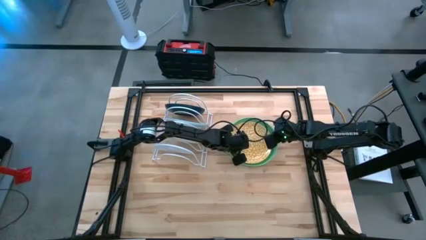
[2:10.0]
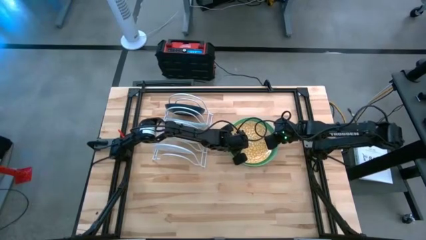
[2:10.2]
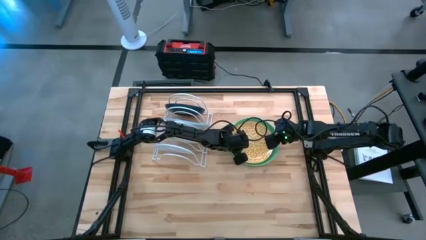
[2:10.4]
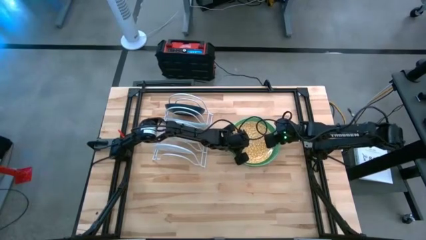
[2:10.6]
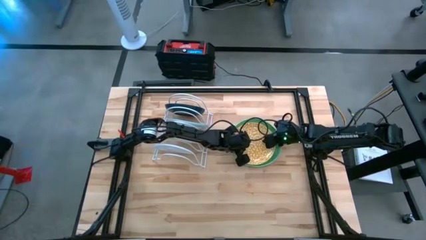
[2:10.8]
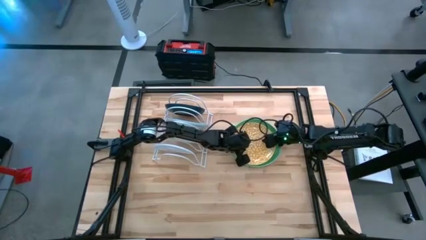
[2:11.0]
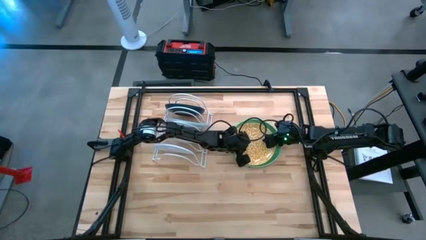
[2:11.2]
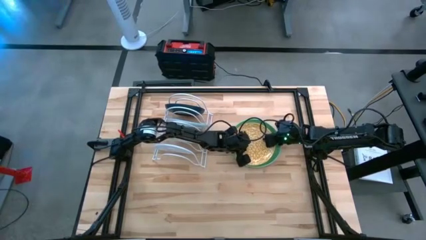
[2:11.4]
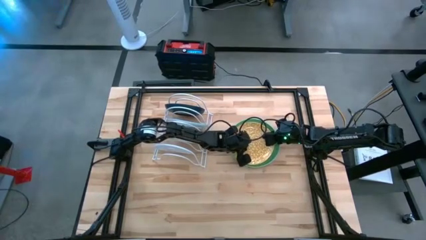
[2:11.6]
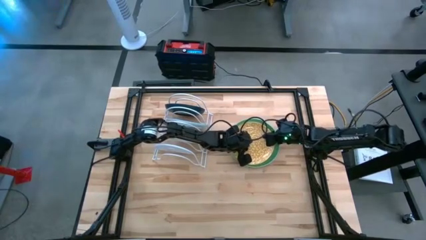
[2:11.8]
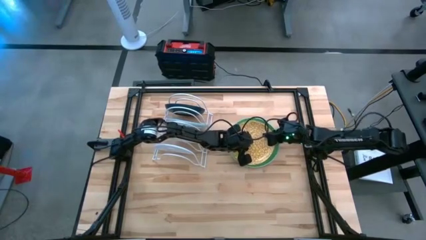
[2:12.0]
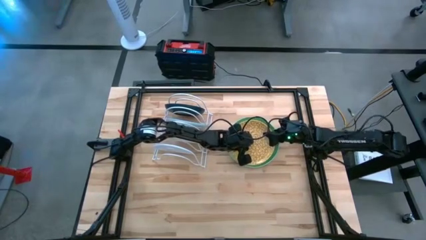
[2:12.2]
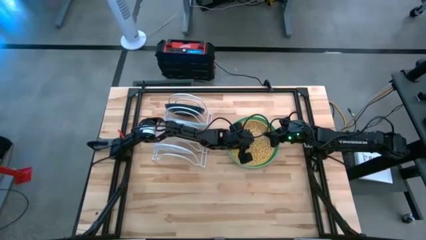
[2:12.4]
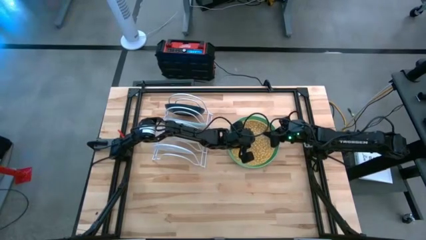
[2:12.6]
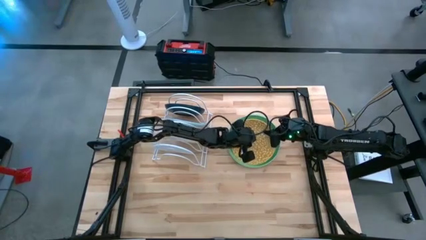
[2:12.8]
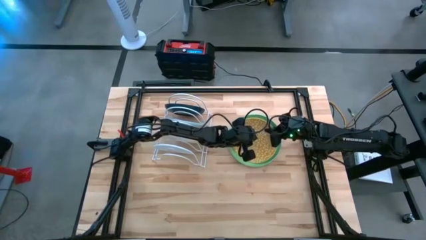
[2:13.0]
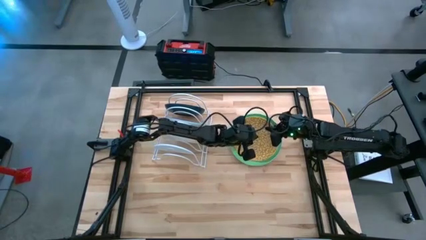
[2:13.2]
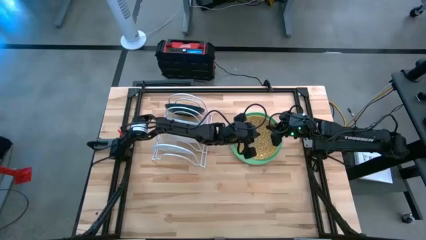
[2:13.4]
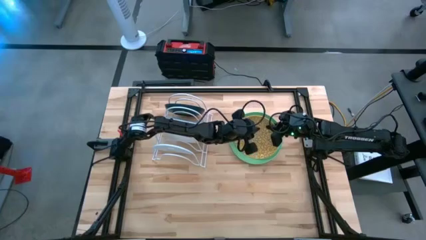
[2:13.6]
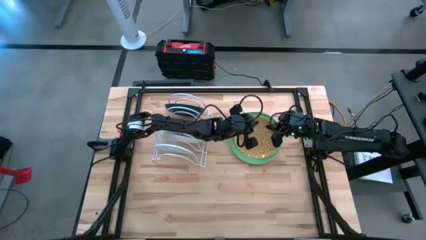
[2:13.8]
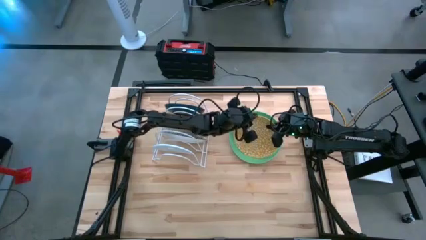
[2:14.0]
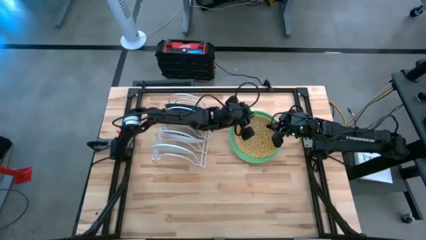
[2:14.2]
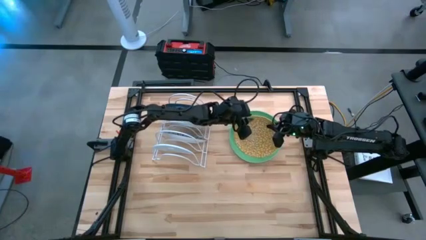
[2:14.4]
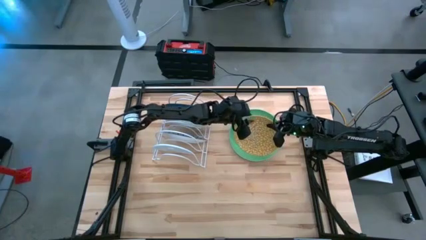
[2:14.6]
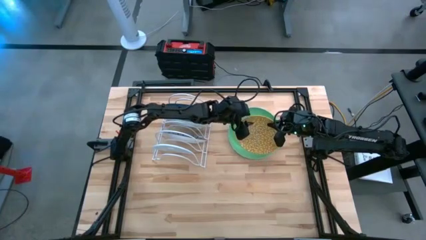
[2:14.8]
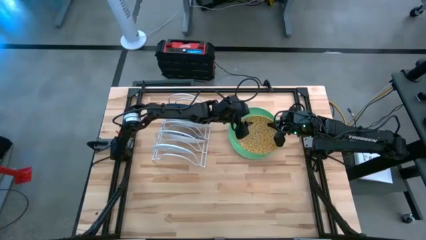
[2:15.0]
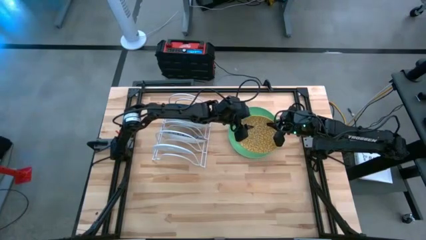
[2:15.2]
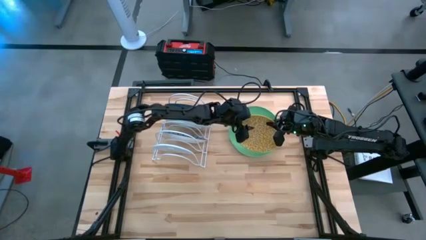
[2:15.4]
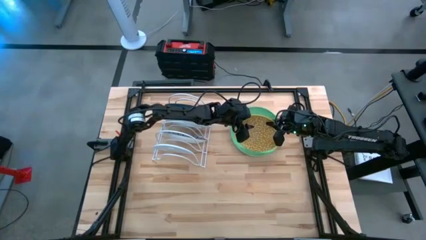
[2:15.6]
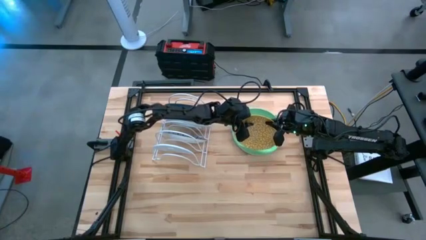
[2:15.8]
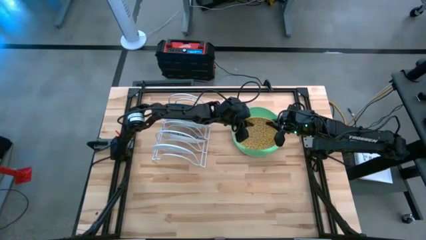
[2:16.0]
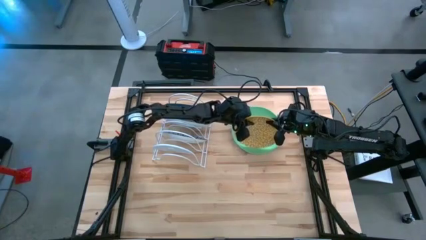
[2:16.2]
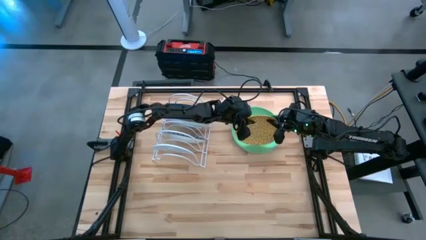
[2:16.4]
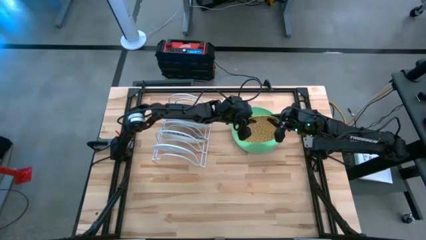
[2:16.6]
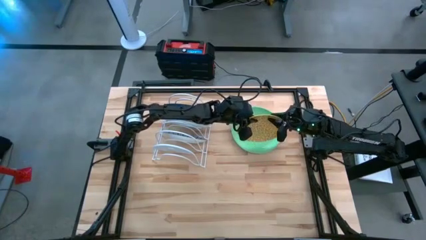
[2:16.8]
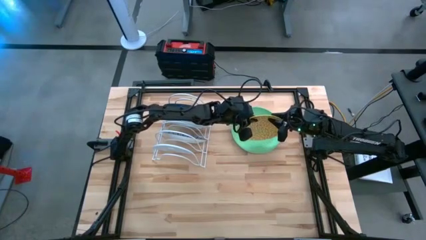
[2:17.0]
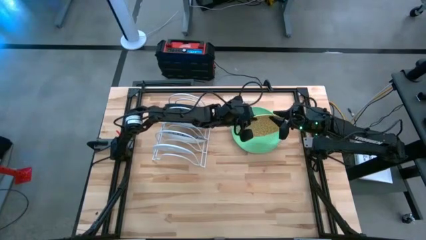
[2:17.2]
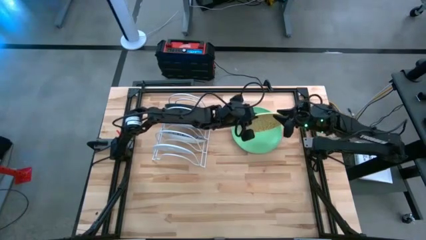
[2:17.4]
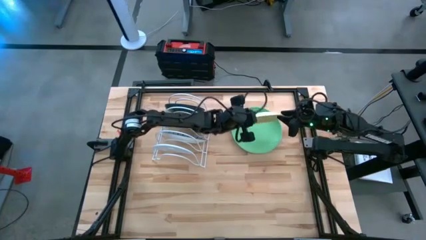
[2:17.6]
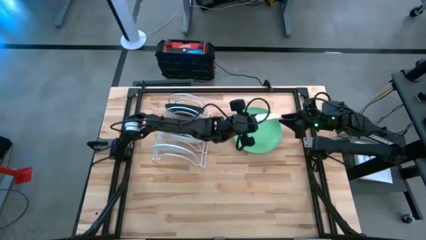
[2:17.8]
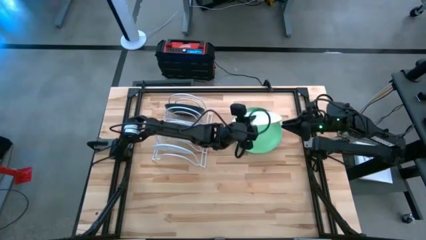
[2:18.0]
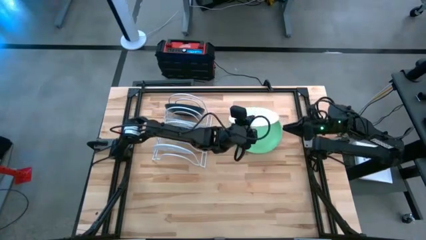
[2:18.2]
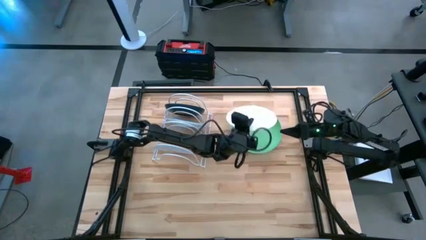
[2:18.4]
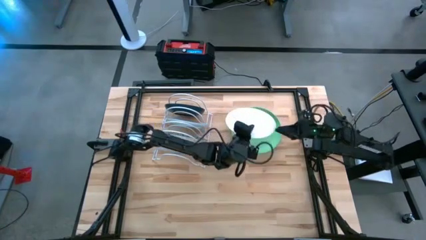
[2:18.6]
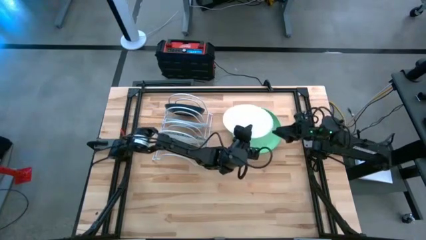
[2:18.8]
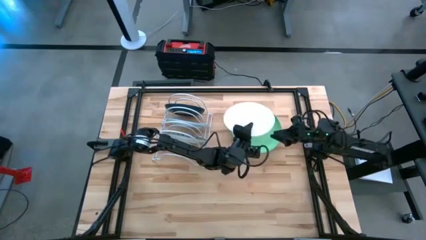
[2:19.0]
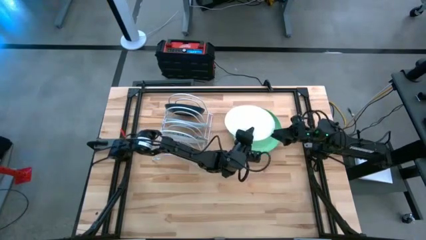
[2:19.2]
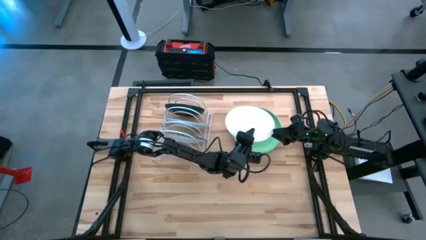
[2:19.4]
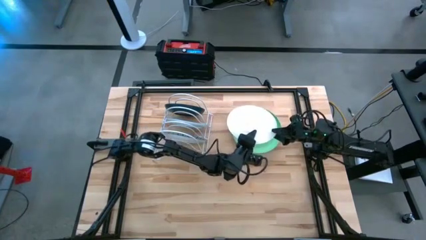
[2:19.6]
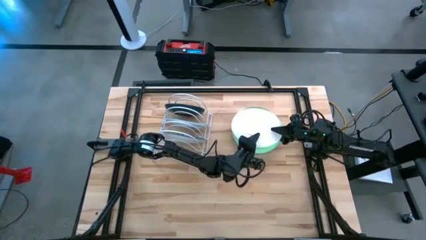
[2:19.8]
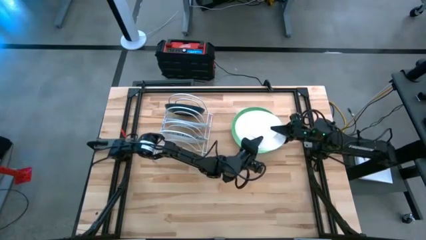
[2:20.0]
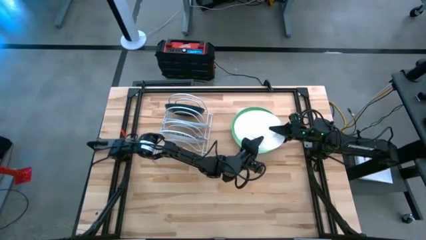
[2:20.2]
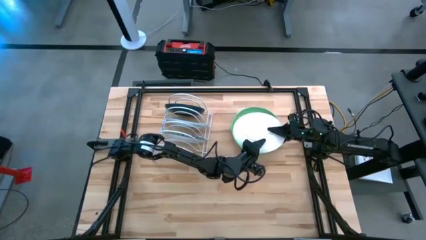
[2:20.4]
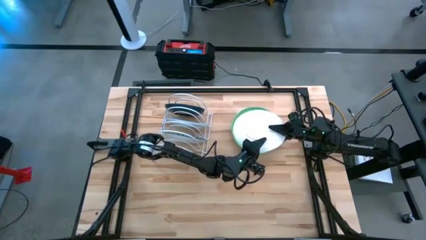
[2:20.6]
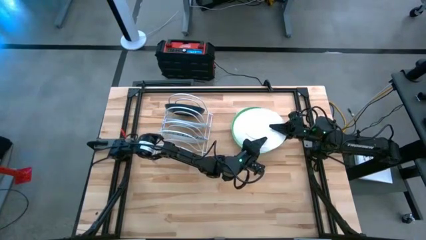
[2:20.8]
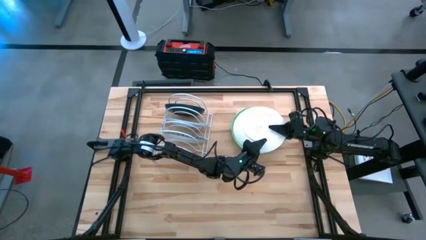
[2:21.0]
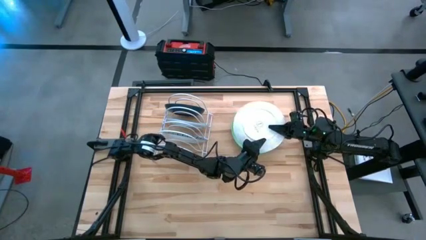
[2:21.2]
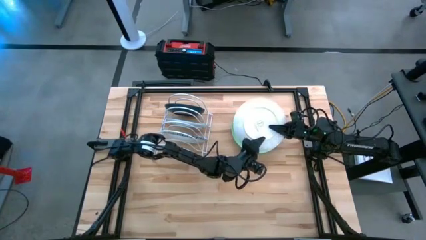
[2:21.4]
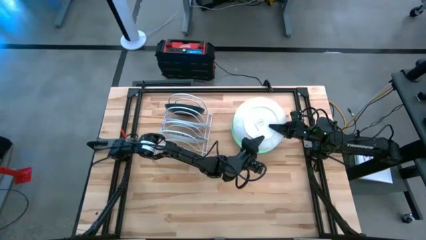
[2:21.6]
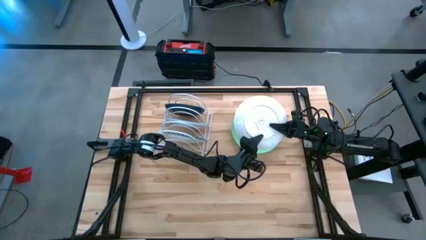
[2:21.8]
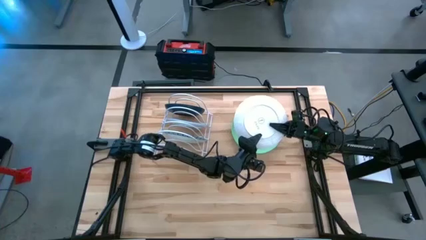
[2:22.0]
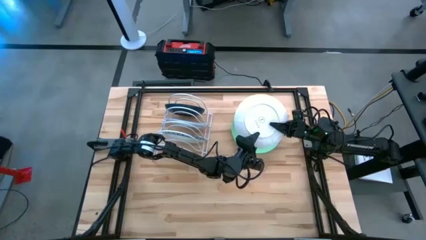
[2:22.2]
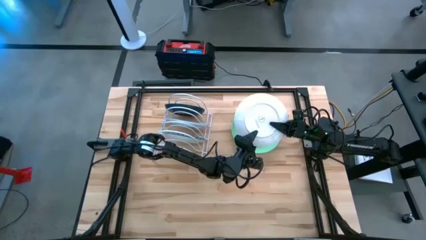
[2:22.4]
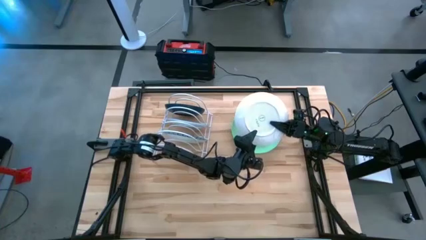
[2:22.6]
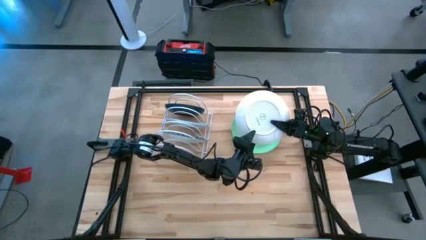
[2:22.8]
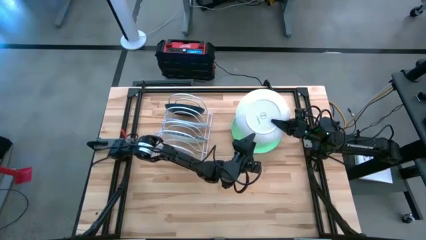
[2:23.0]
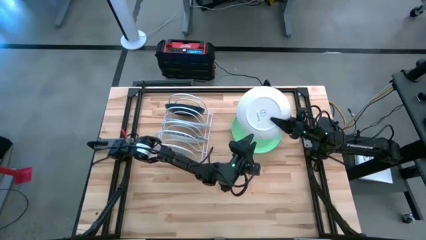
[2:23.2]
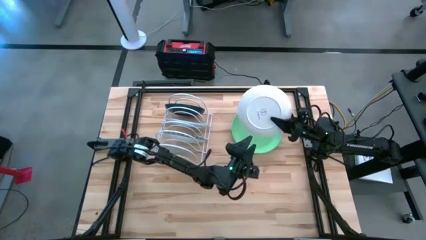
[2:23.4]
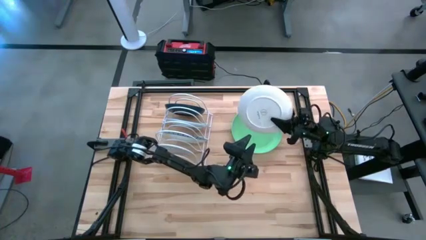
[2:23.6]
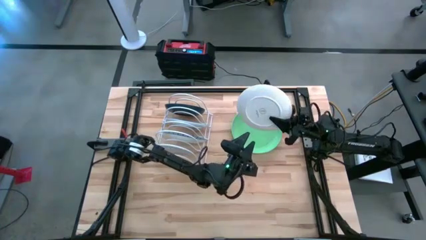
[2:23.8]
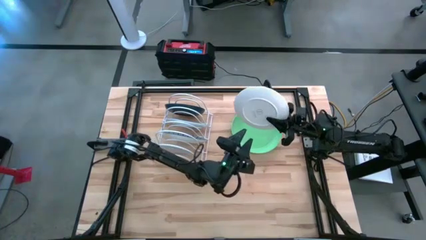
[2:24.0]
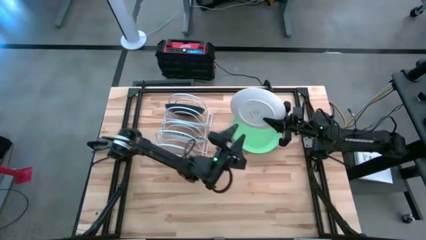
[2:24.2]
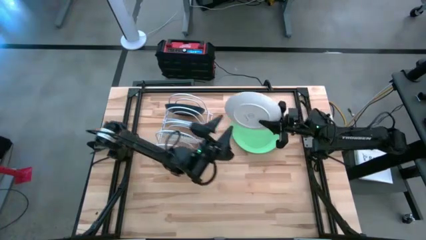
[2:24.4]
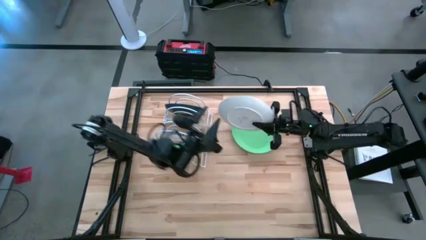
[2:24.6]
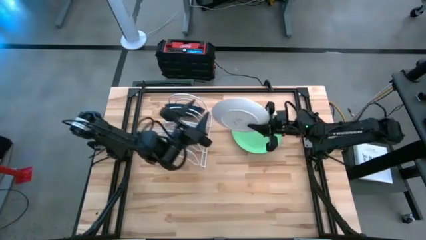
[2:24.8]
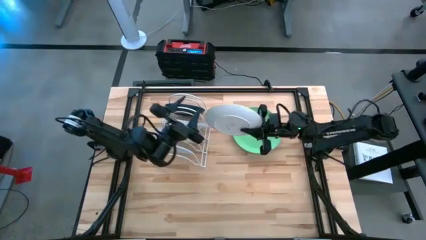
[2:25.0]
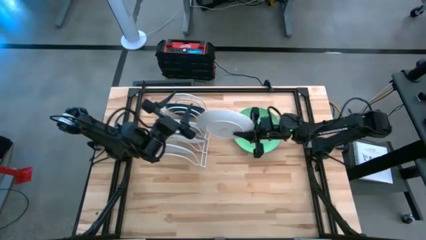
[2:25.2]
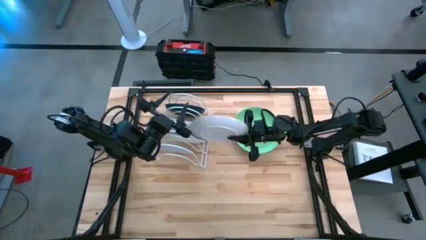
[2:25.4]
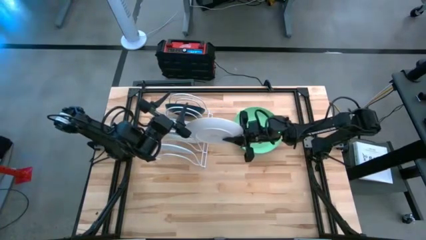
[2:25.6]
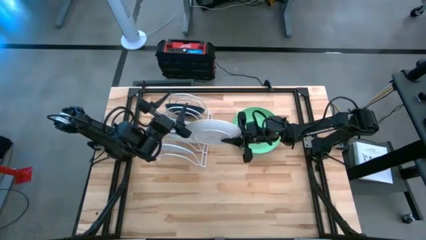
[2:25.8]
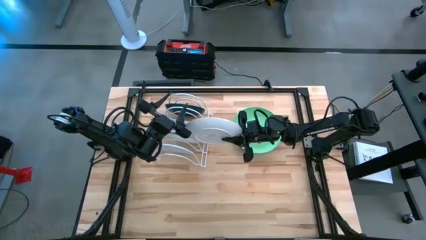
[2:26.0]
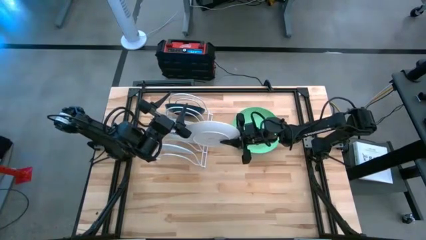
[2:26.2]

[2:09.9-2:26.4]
Task: Sort dishes
Put the yellow pattern plate in the dish rack
